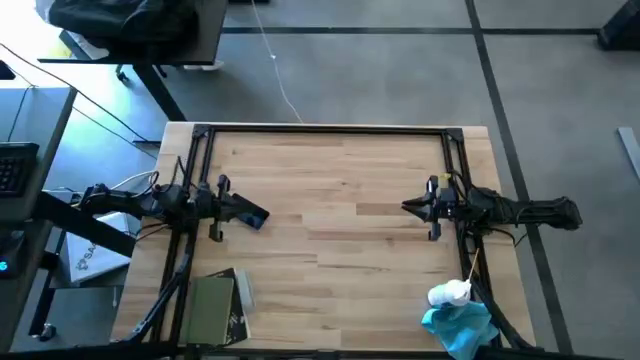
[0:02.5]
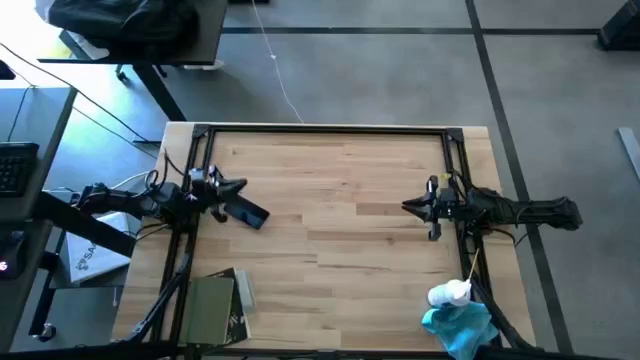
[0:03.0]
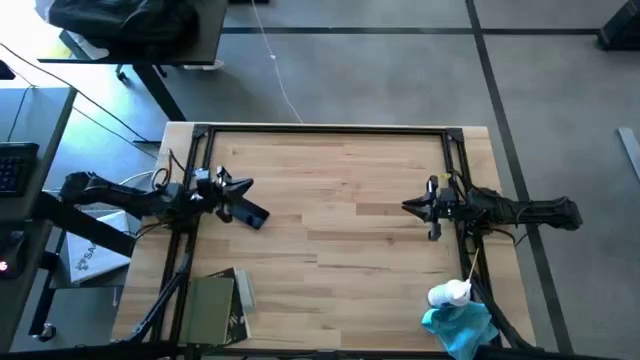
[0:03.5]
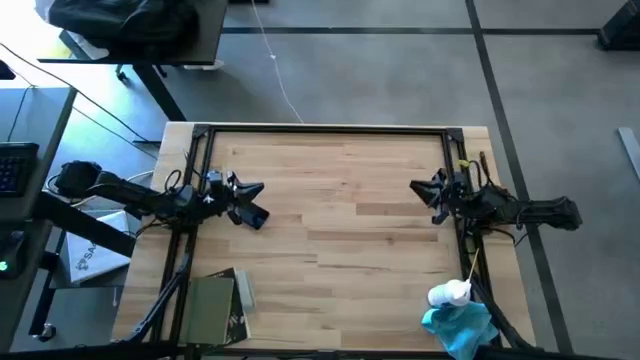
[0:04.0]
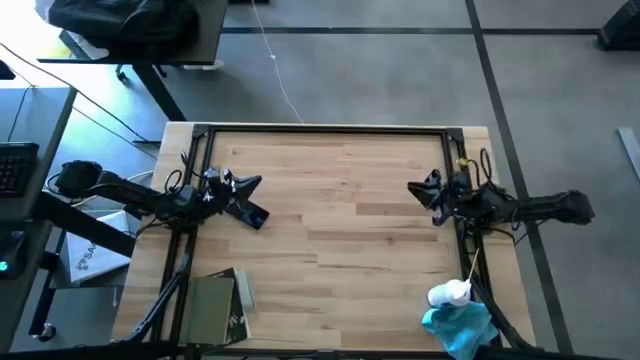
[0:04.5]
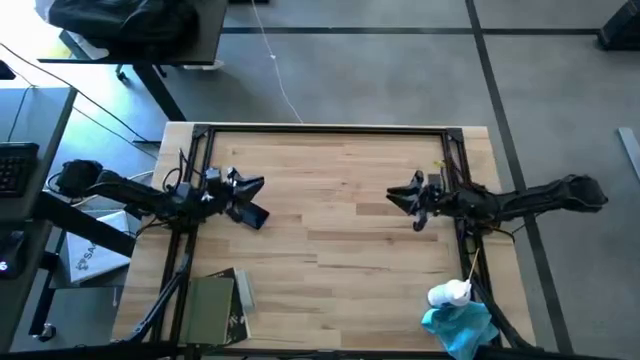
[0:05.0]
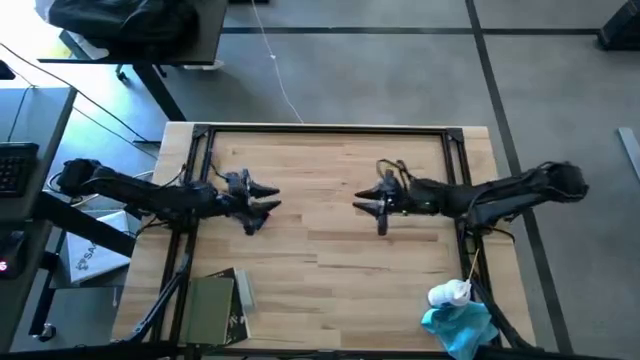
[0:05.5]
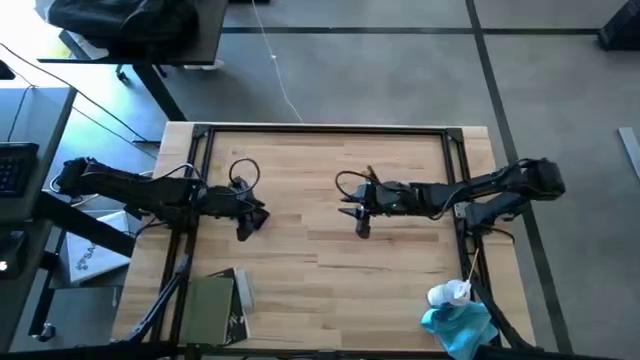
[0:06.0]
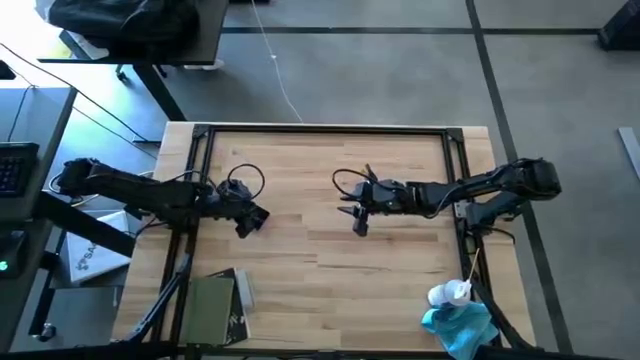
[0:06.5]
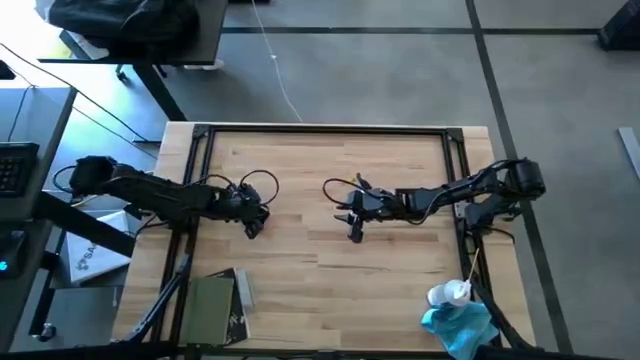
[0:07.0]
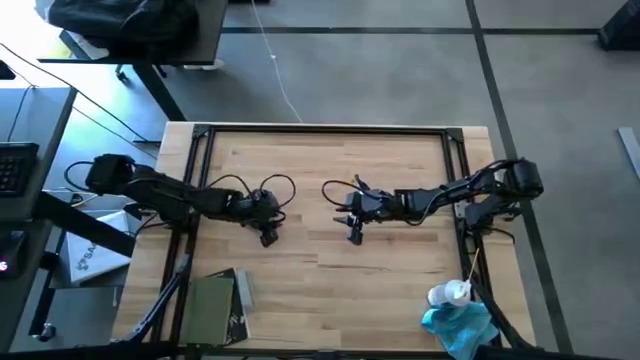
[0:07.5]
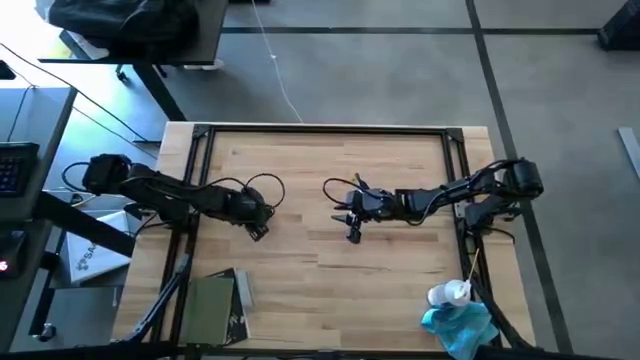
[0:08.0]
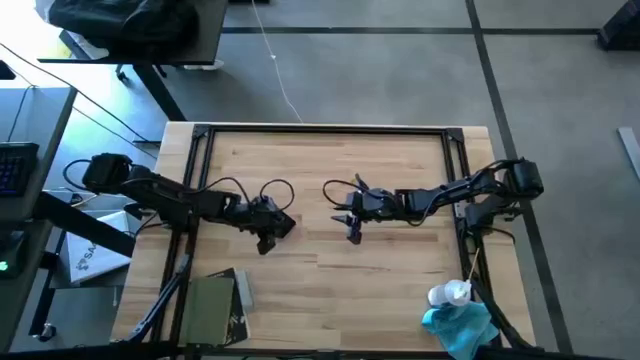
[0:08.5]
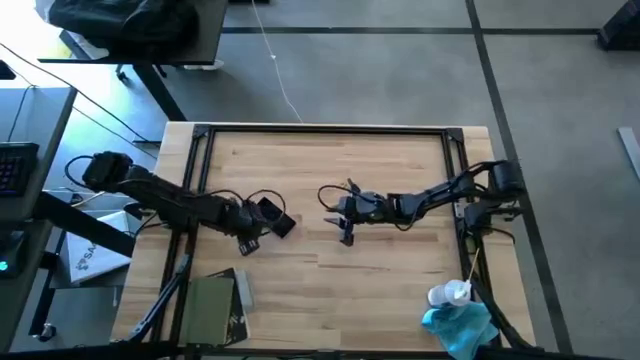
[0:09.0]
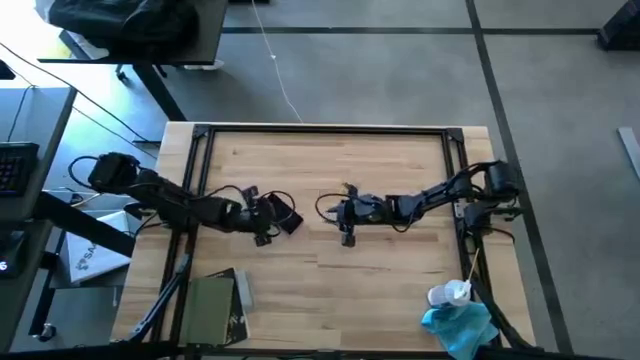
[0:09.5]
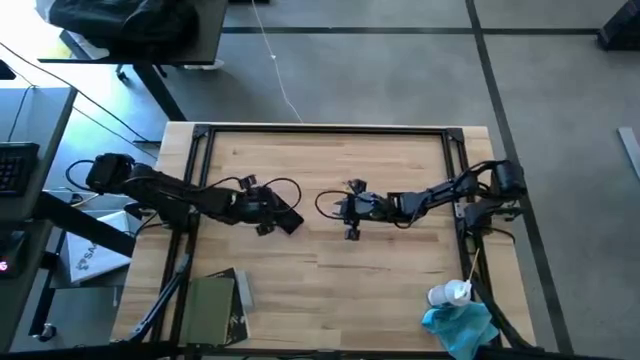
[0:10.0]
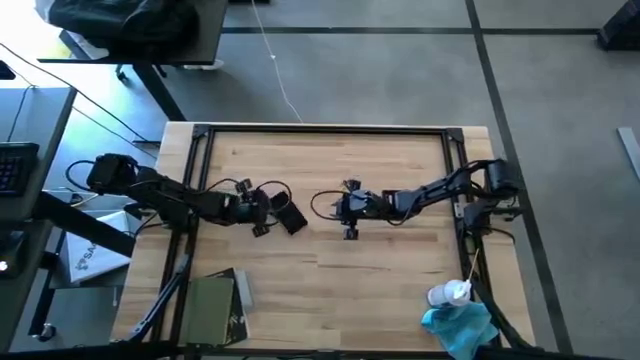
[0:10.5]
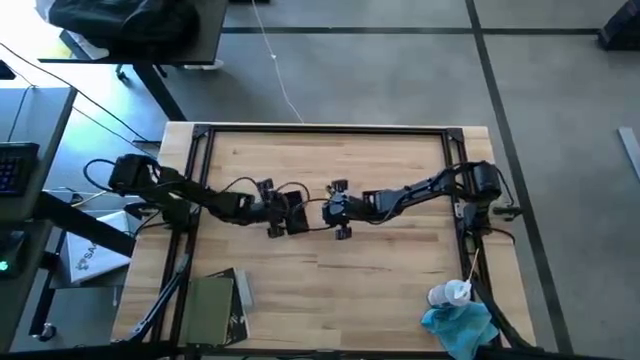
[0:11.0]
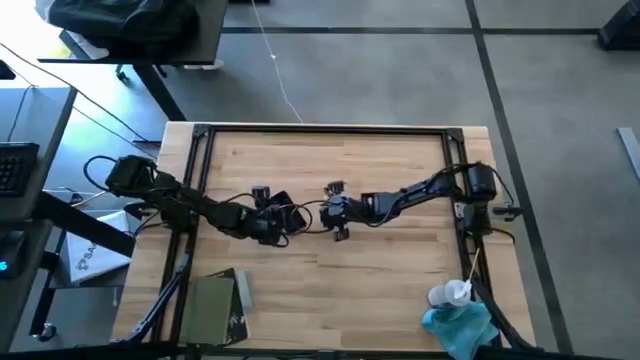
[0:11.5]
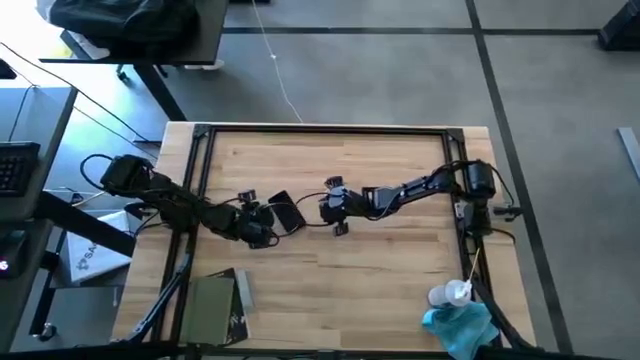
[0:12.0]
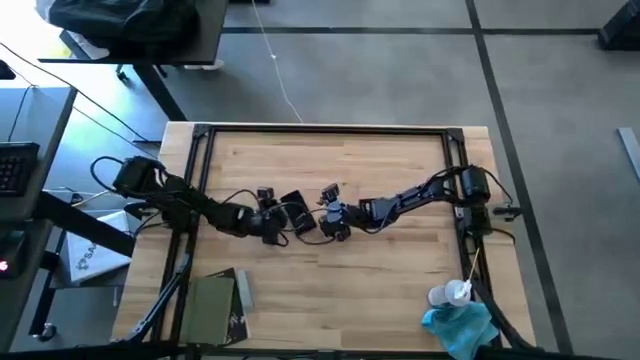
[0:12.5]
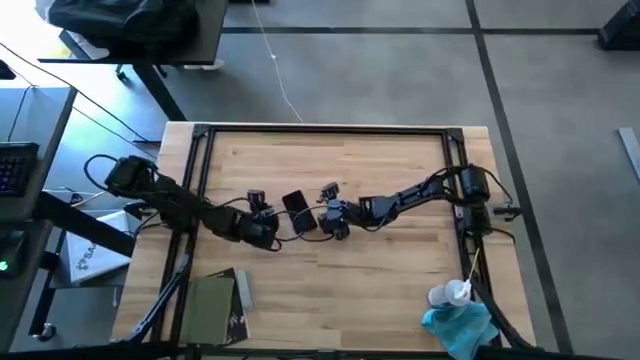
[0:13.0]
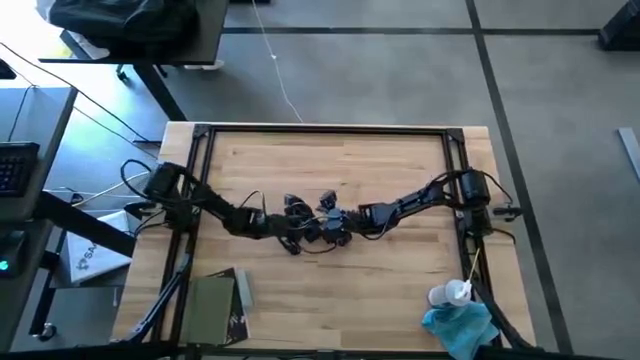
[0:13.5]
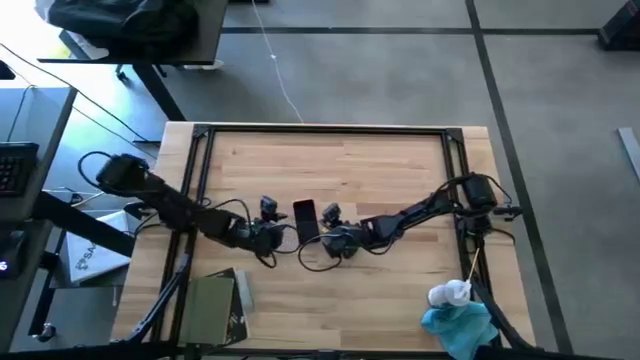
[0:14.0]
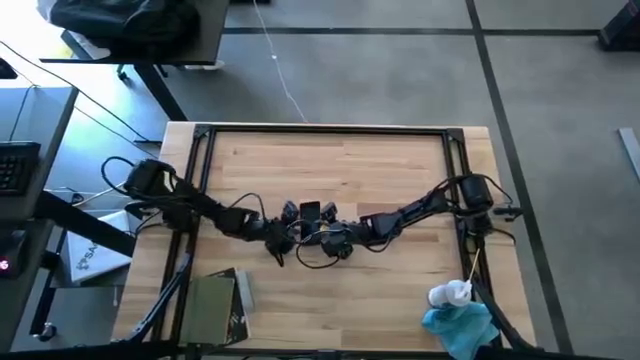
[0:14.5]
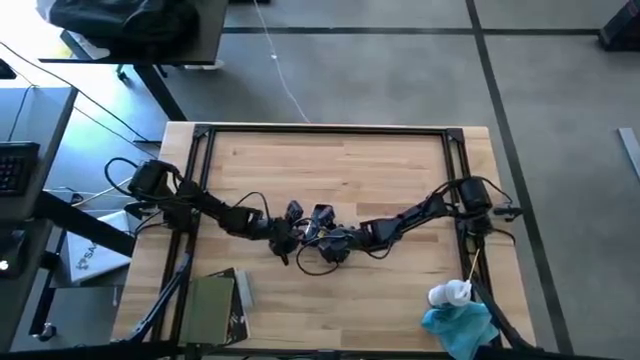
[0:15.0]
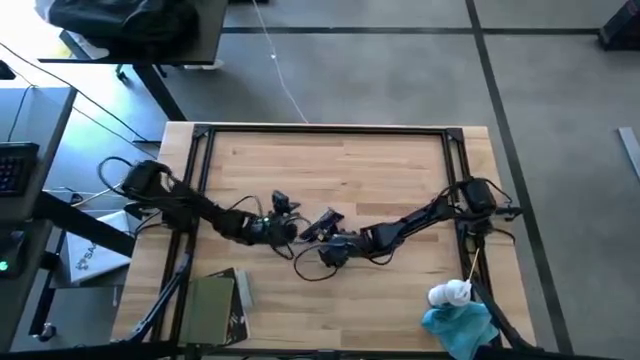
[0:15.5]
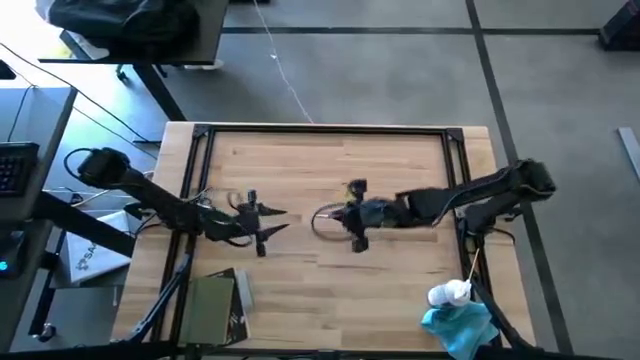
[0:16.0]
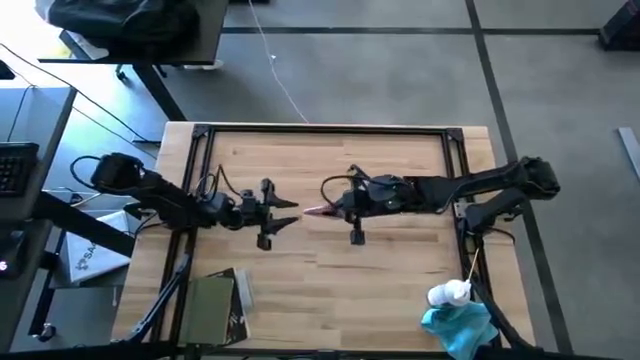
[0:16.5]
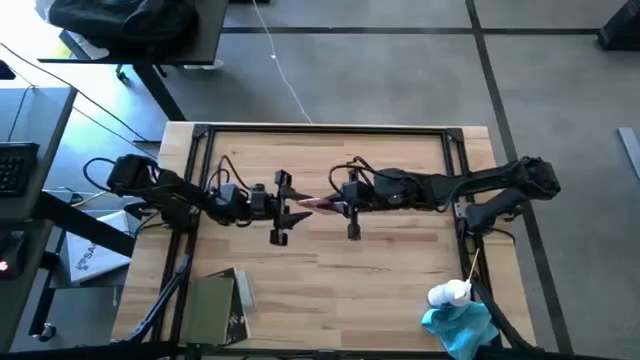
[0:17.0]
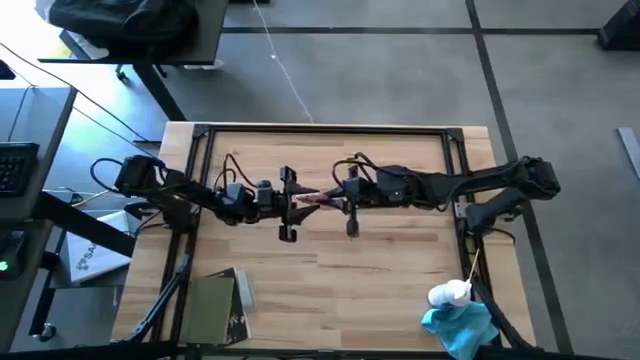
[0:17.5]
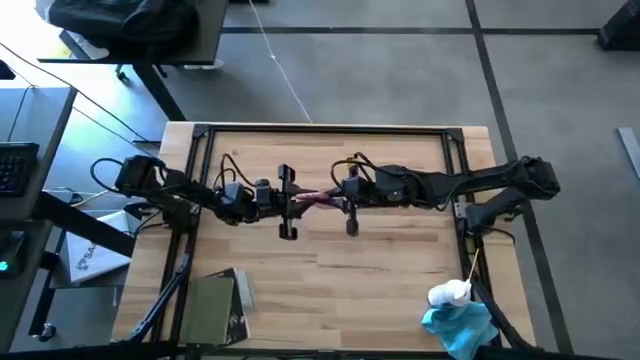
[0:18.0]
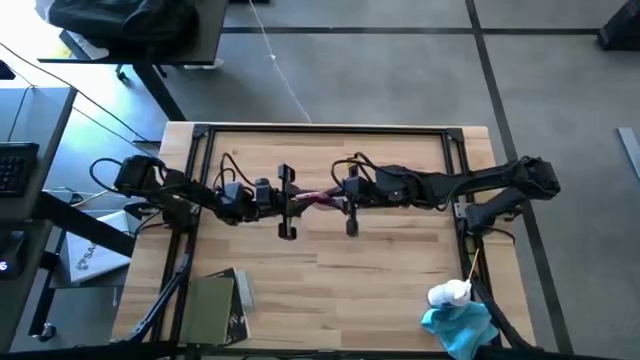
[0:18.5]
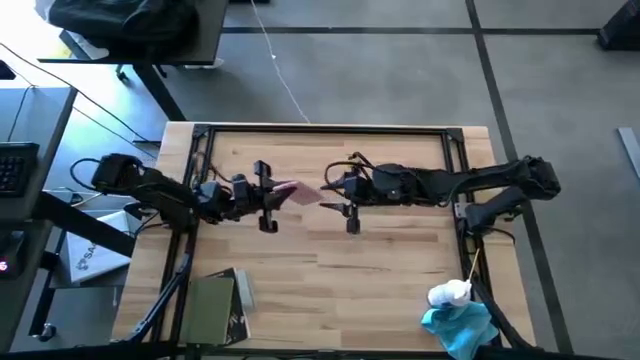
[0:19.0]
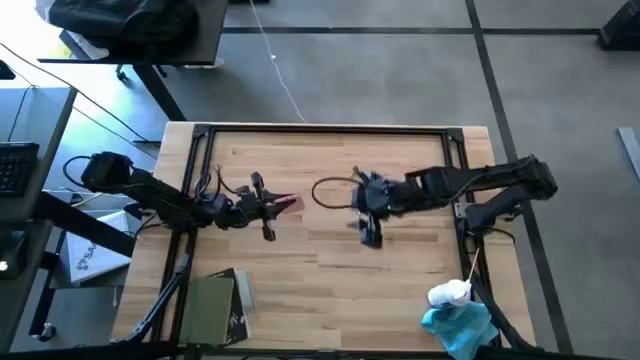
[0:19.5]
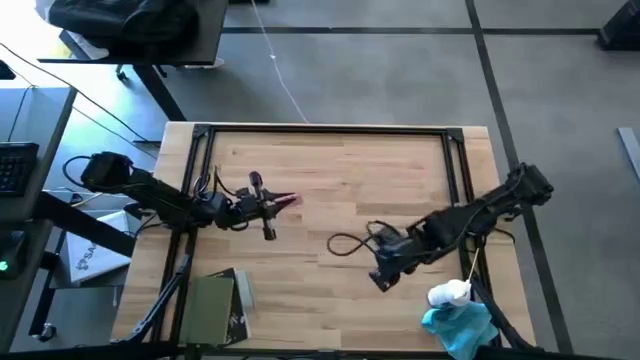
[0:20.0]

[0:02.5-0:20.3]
Task: Apply microfiber cloth
Spray the pink cellphone using the spray bottle
